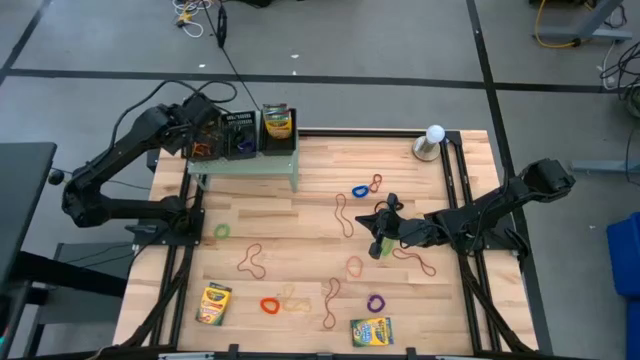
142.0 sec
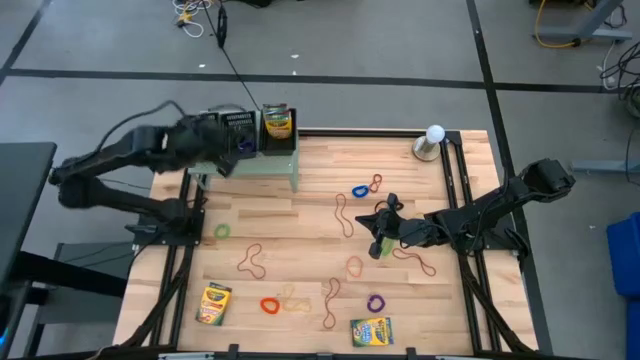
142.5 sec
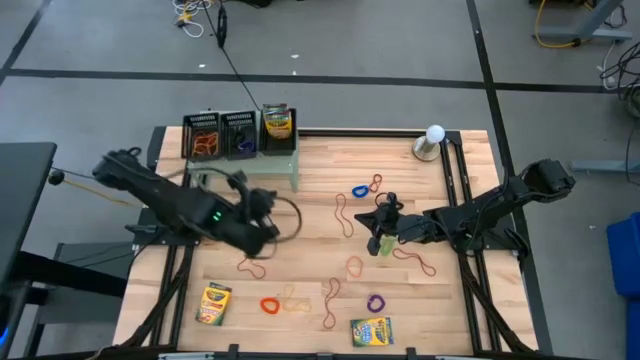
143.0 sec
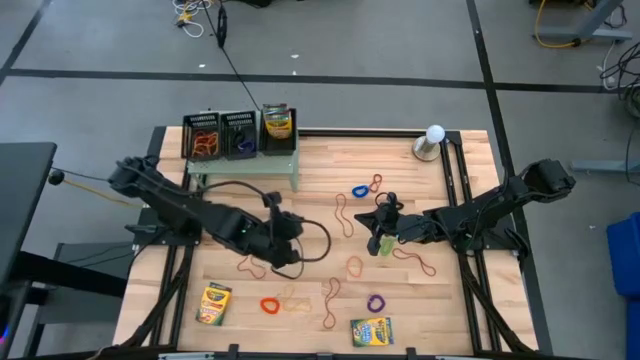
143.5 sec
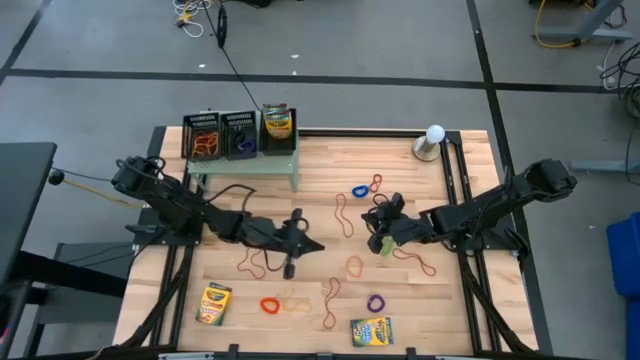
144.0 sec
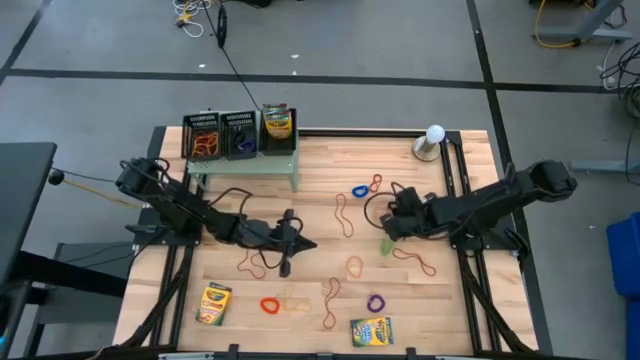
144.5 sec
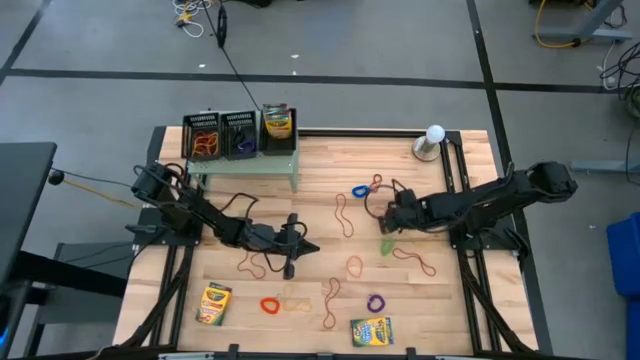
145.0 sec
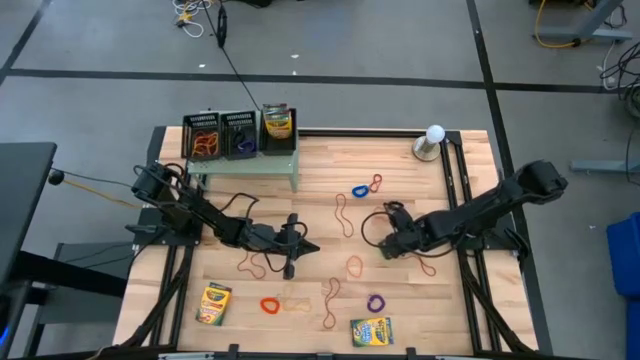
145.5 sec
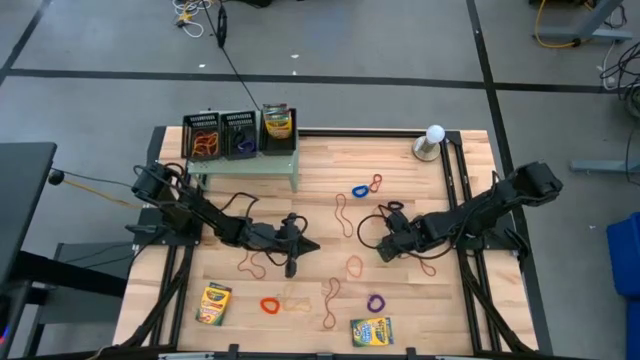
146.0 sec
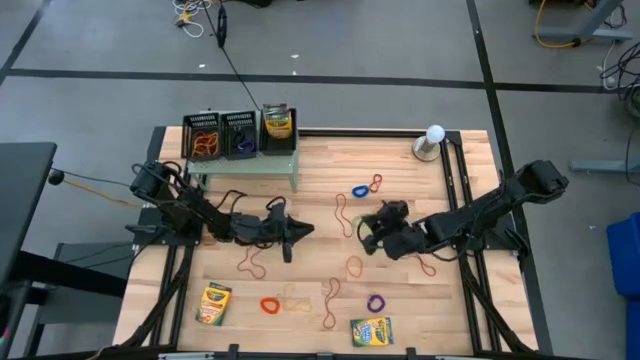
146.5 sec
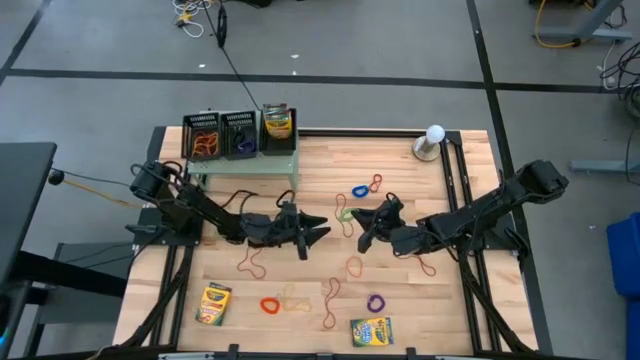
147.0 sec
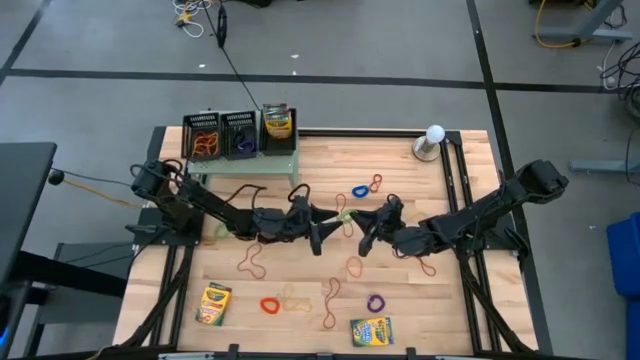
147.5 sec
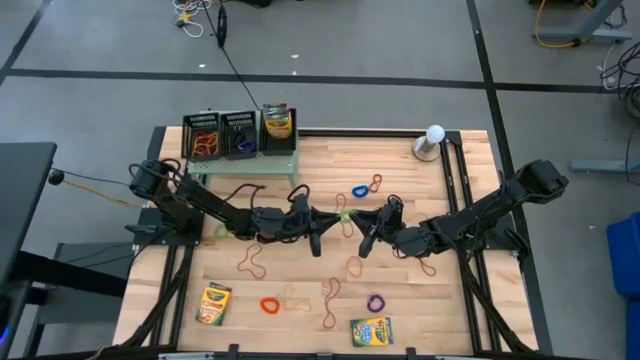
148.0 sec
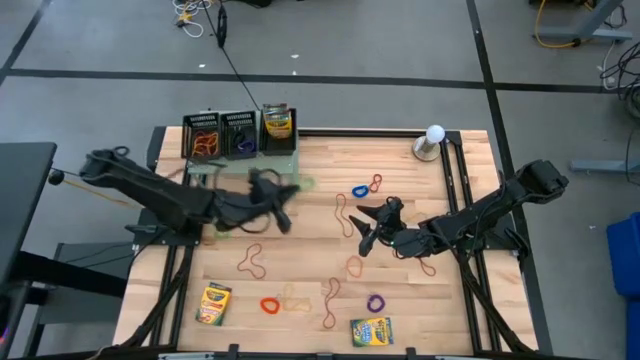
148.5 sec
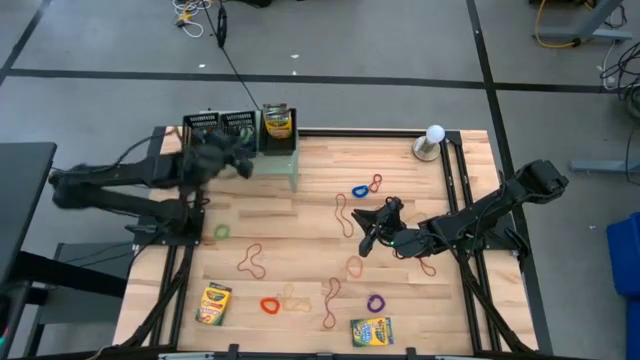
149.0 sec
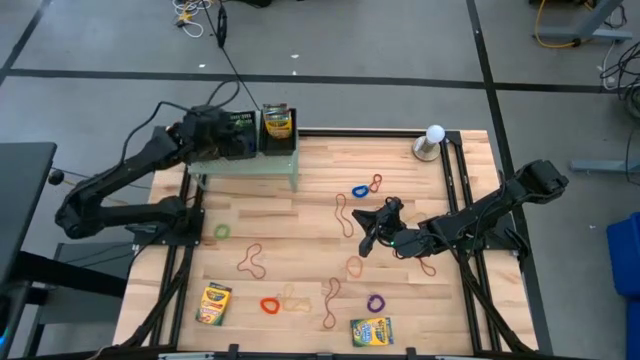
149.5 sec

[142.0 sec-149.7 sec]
Task: Pick & Place Office Desk Supplies
Put the green spring keychain into the middle black bin on the shelf

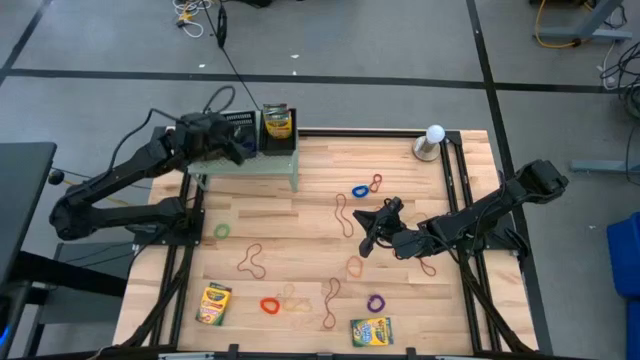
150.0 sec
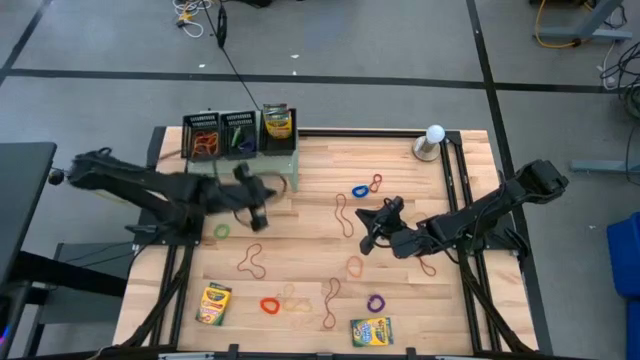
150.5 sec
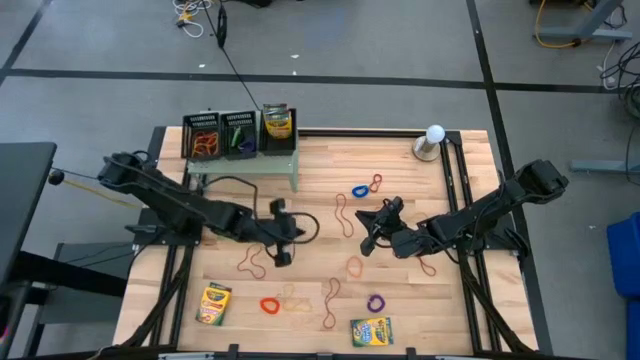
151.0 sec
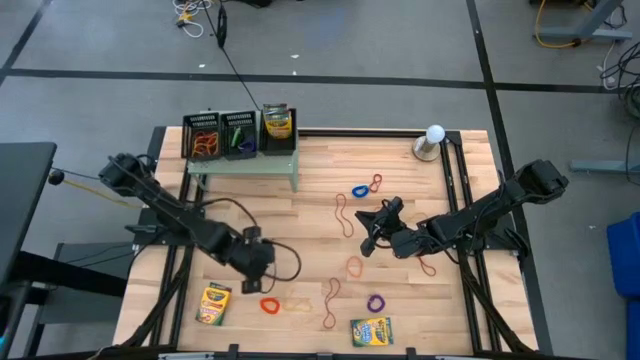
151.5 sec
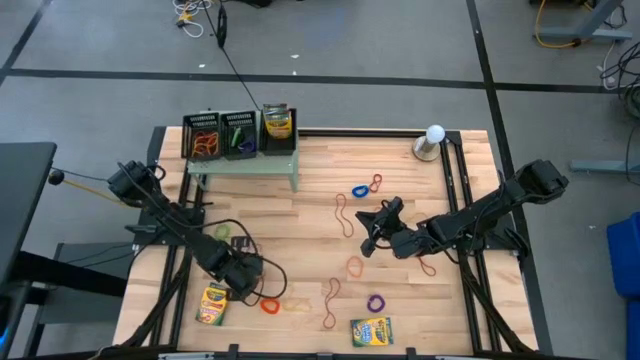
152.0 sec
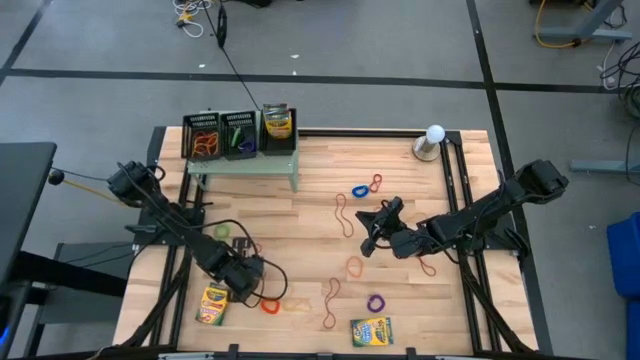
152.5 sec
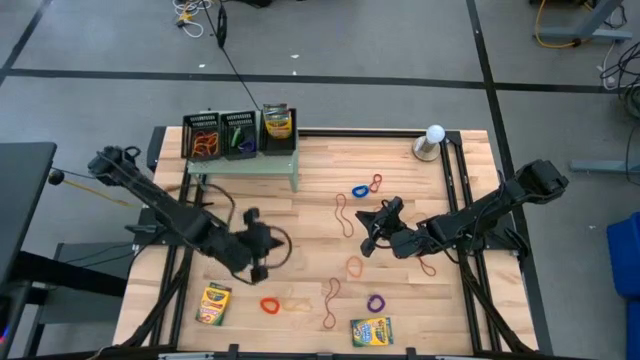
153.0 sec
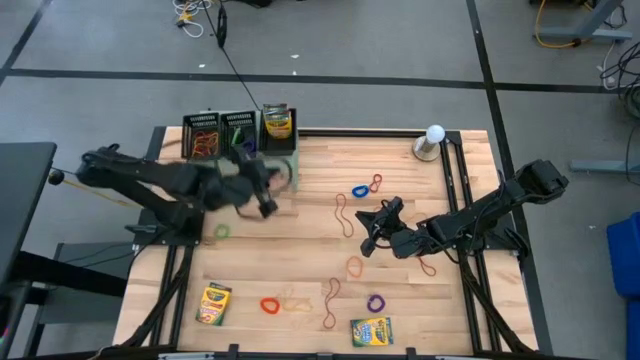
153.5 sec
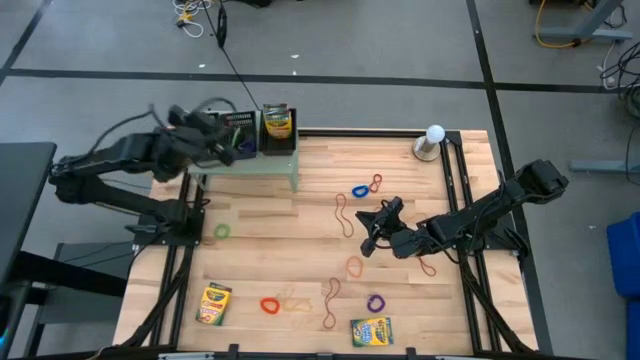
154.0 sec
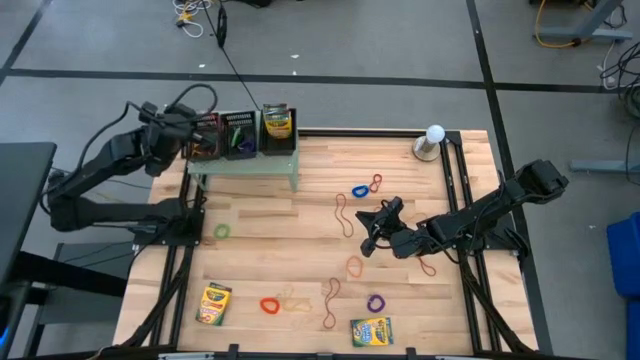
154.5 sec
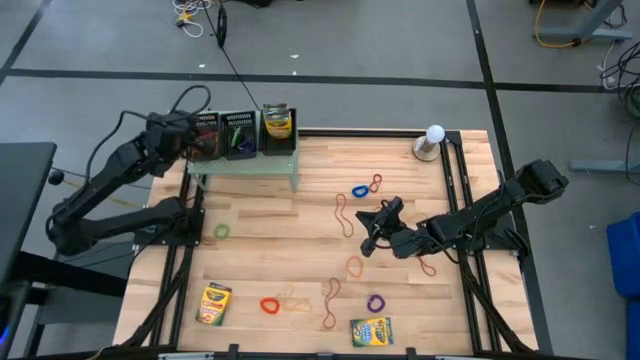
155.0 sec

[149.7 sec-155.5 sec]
Put the red rubber band into the left black bin on the shelf

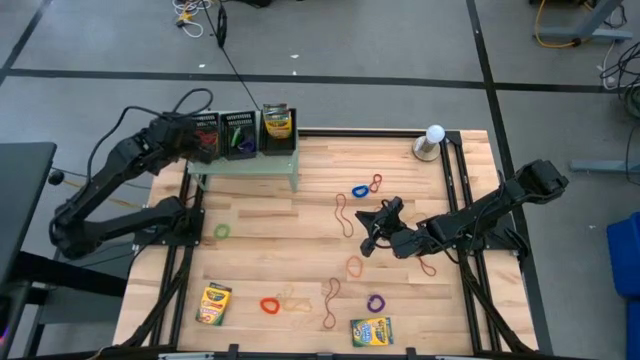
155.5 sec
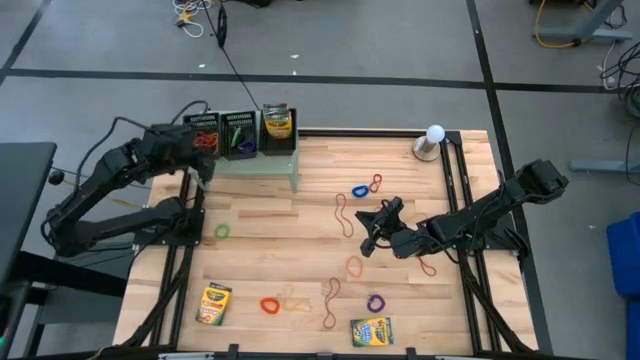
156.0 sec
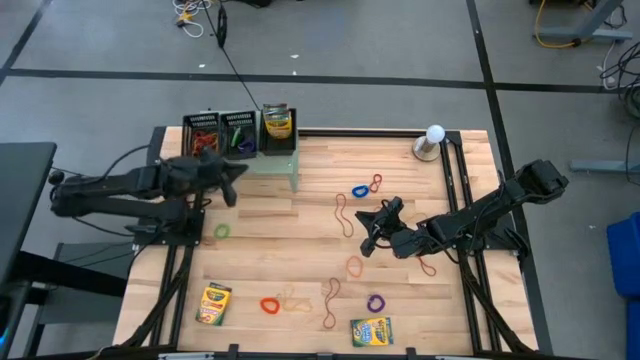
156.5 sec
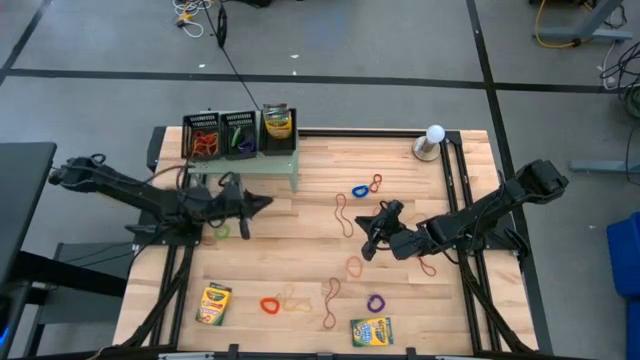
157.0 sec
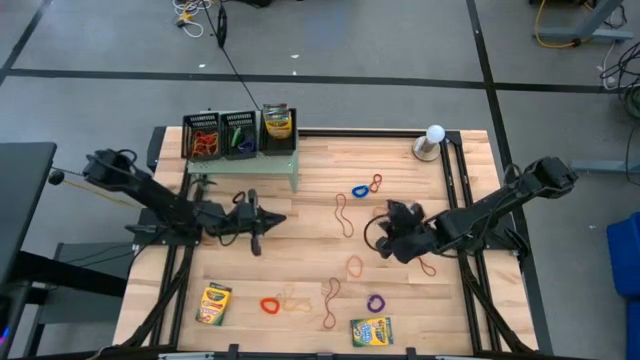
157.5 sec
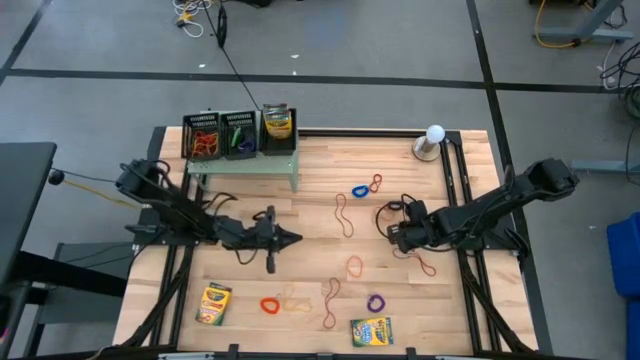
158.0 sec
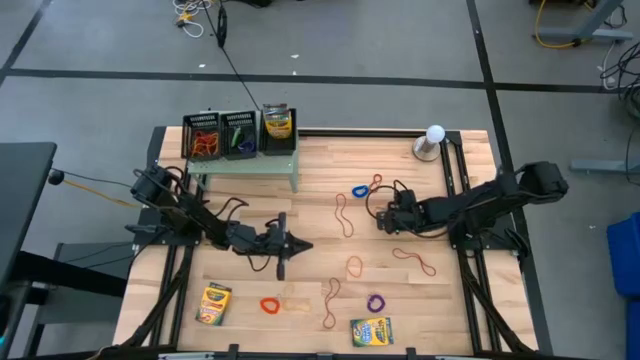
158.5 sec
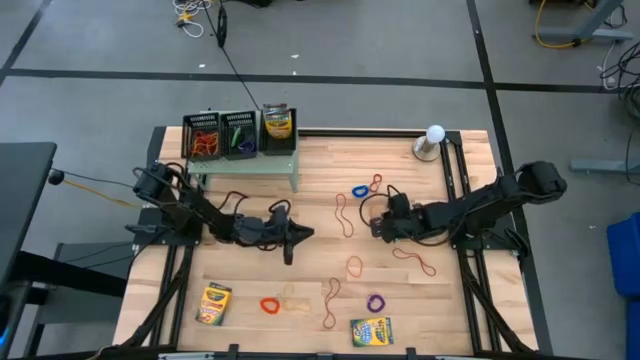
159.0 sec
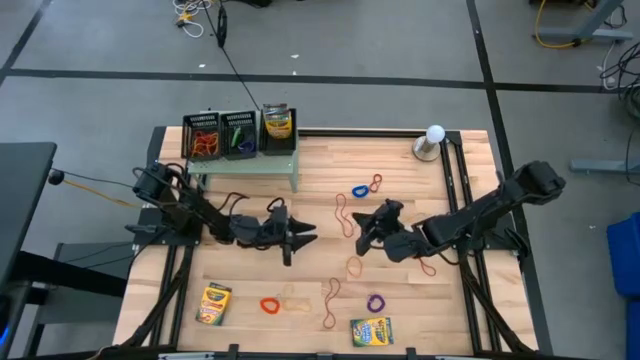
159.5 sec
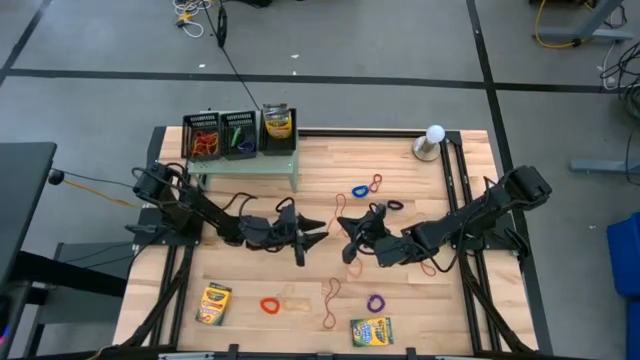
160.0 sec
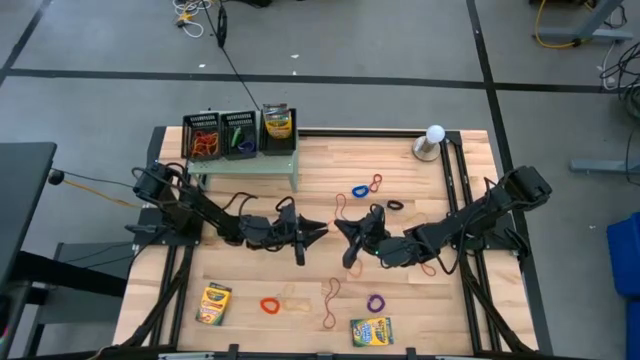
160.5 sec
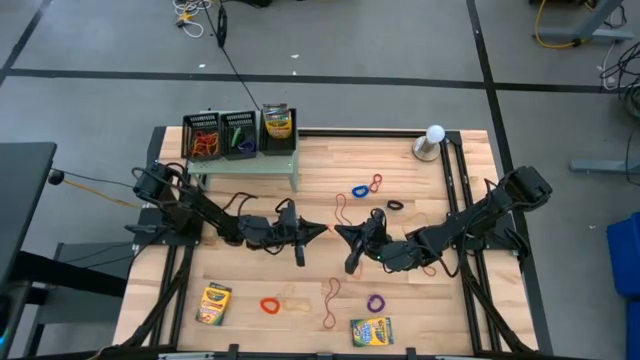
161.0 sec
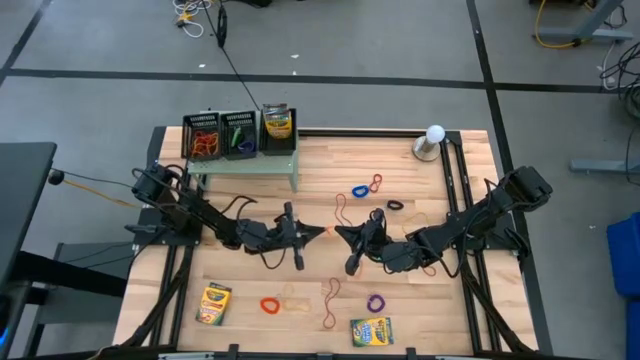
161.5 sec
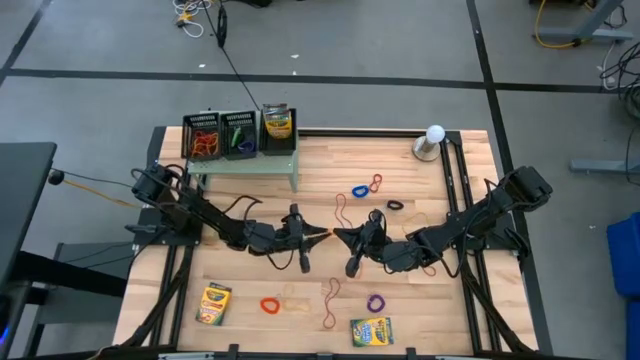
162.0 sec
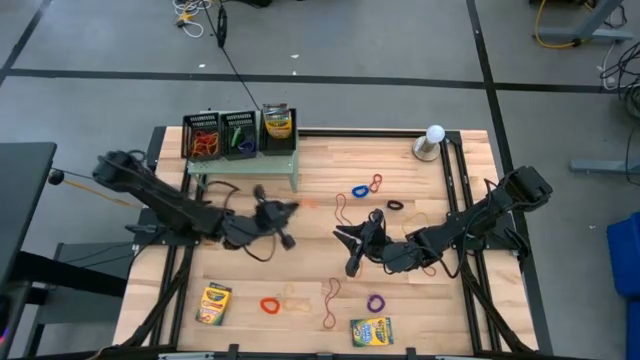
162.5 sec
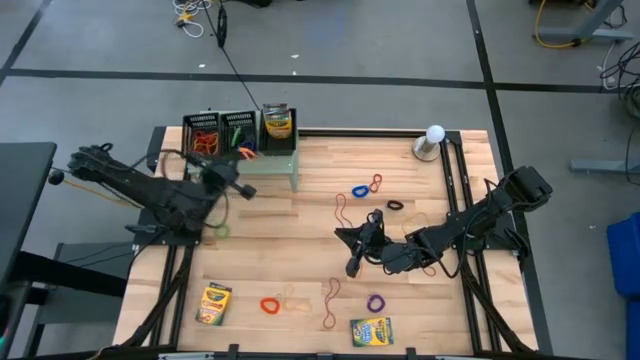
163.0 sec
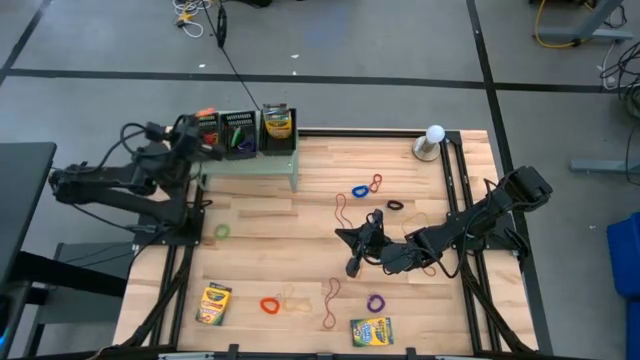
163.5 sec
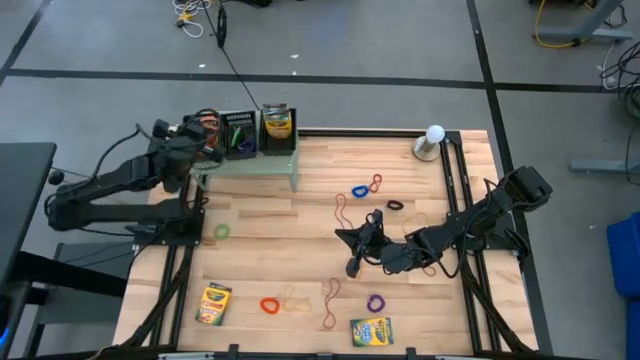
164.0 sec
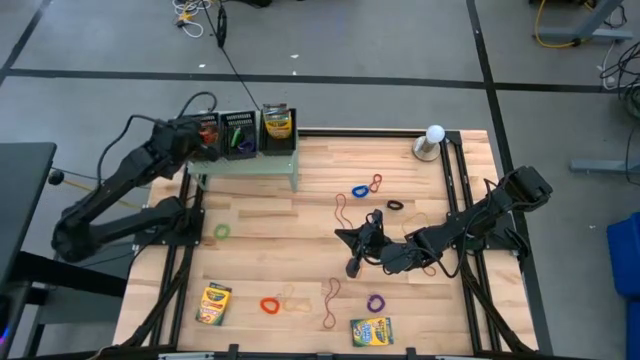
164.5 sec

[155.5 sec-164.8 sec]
Put the orange rubber band into the left black bin on the shelf
